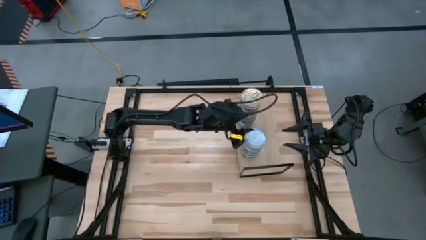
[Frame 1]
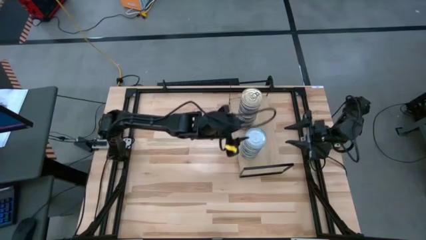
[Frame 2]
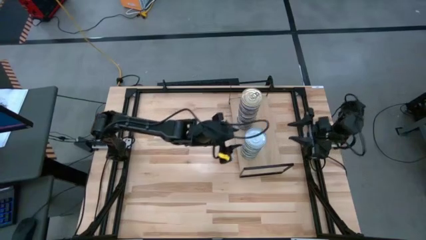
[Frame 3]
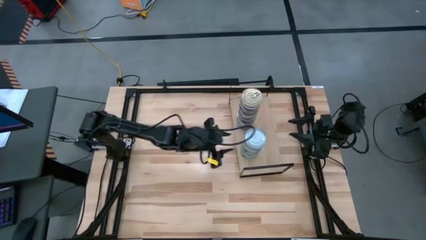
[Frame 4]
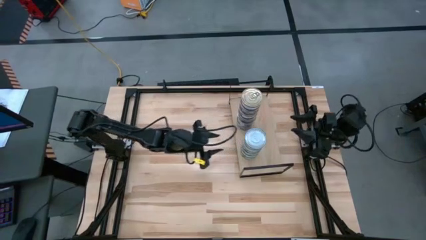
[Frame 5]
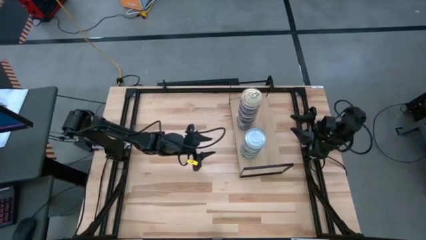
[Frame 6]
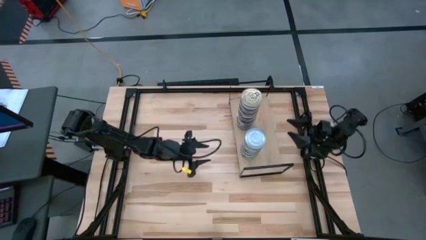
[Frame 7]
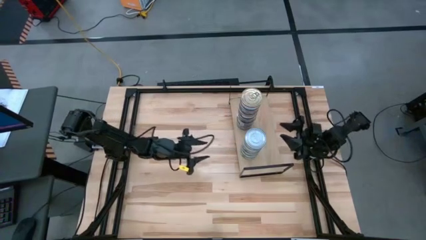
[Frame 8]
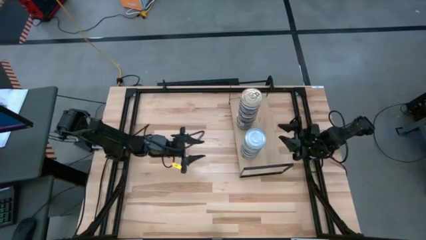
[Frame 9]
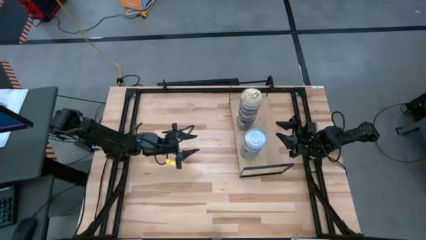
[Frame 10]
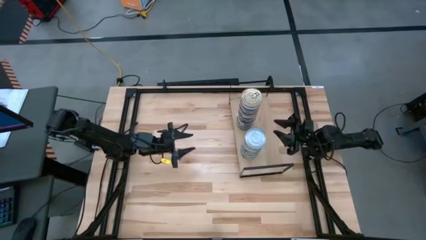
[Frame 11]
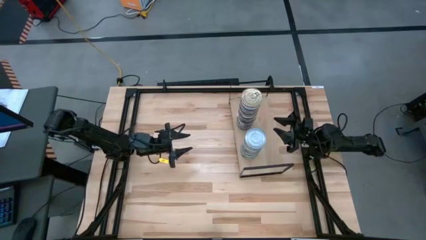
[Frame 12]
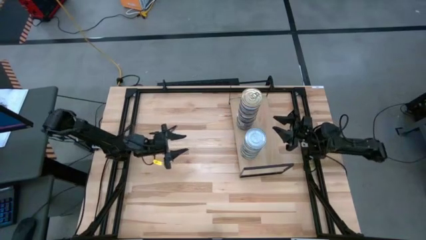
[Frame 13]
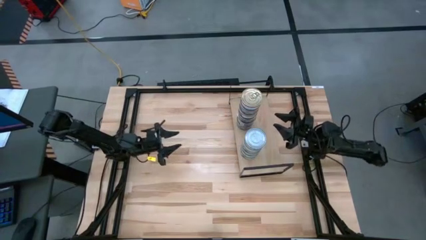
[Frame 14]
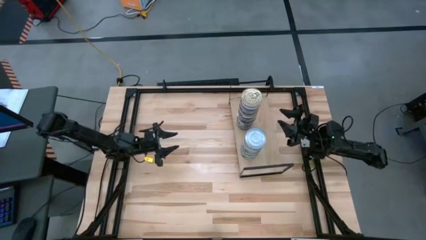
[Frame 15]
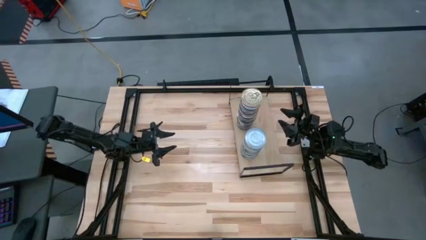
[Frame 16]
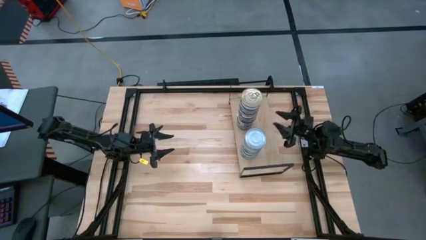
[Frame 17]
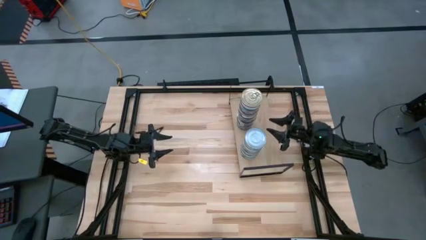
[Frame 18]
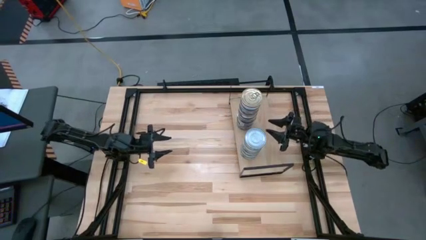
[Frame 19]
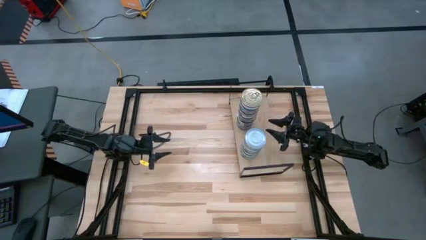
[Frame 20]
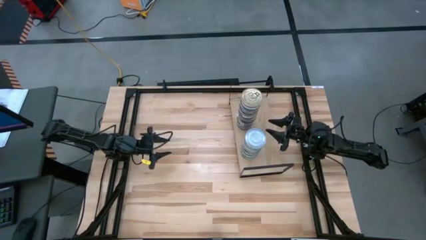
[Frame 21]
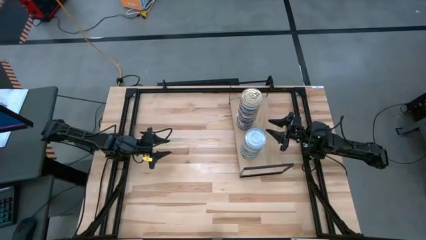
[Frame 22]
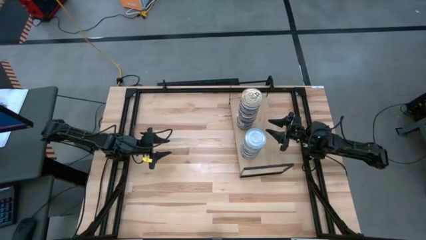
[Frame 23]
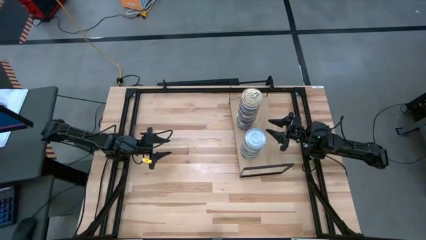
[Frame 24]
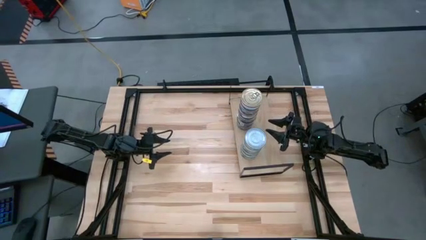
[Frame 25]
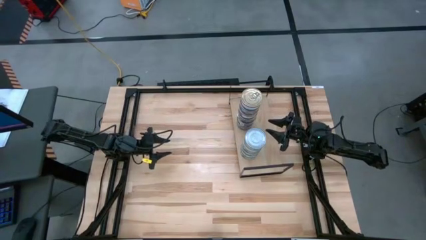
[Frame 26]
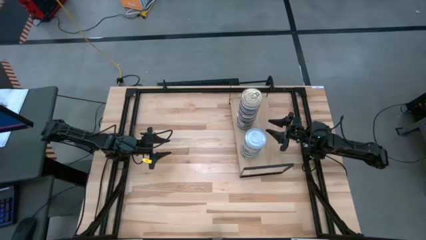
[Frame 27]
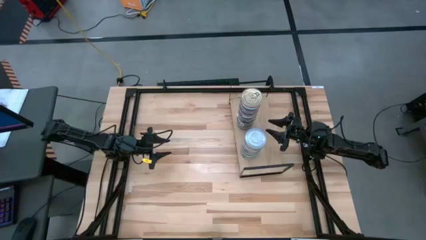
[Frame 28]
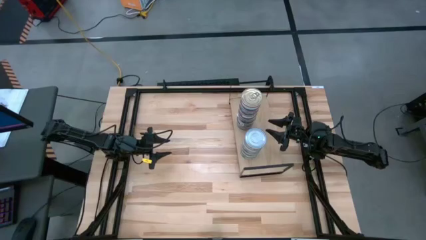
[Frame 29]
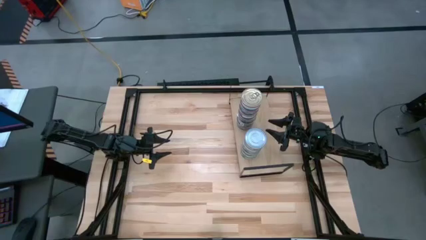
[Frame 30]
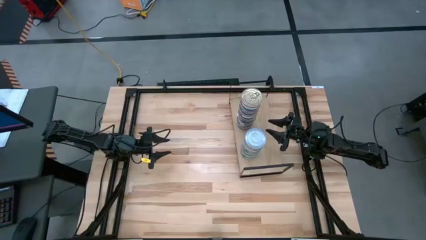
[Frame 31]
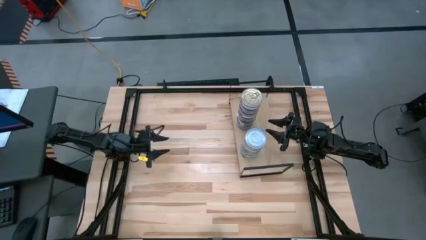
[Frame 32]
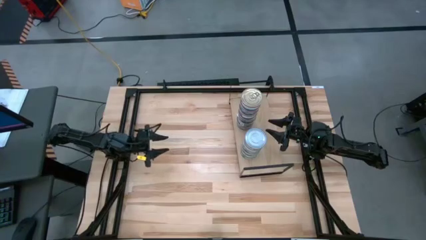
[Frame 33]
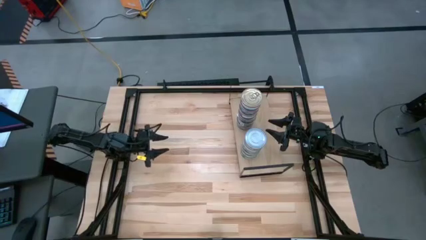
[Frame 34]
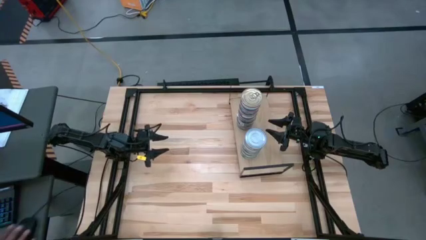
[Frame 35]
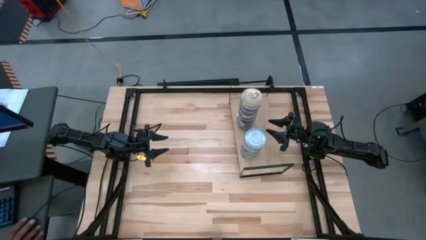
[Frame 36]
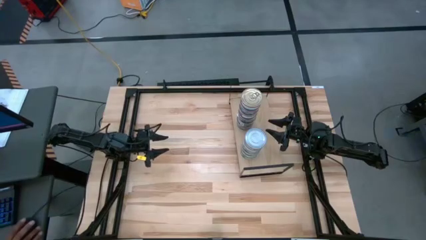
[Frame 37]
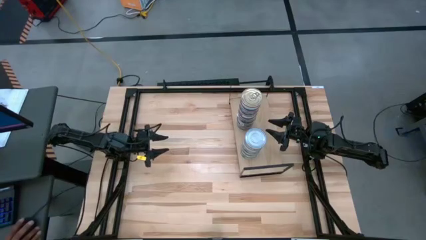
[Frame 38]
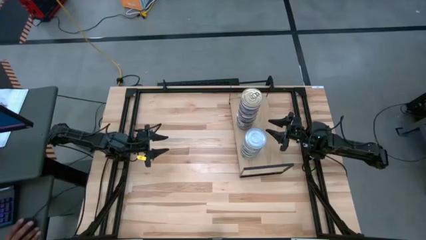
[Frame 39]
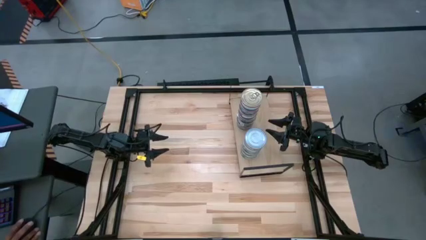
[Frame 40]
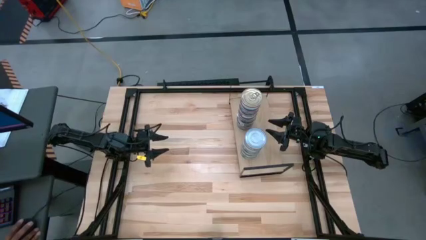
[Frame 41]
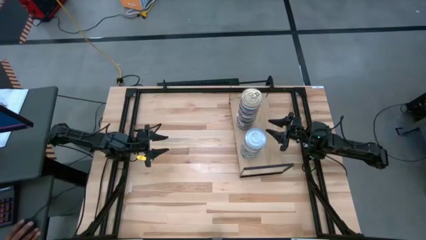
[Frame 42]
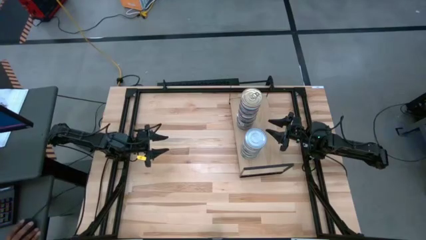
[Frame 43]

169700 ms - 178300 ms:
Task: Stack canned seafood by type on shelf
Return to Home Position
